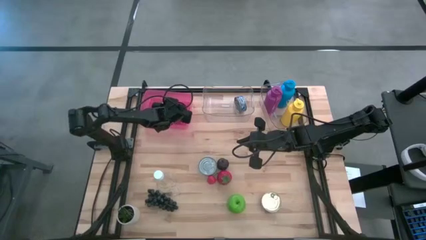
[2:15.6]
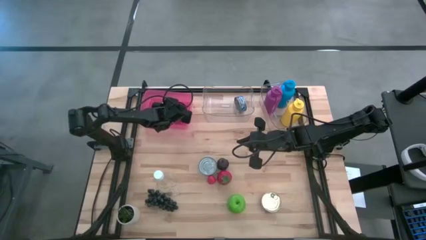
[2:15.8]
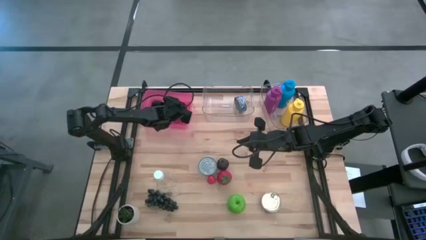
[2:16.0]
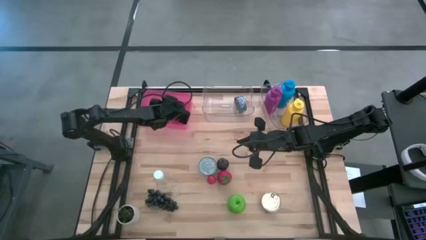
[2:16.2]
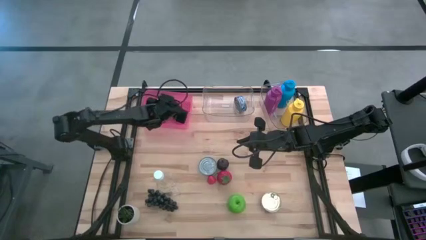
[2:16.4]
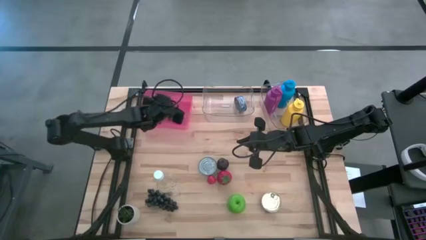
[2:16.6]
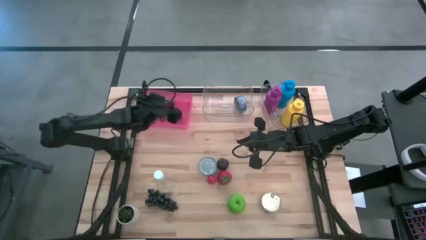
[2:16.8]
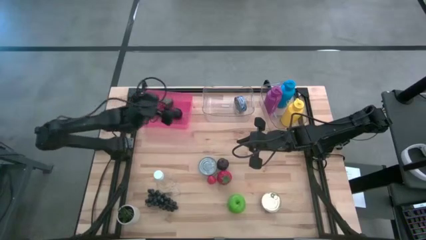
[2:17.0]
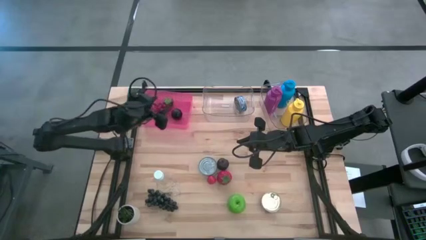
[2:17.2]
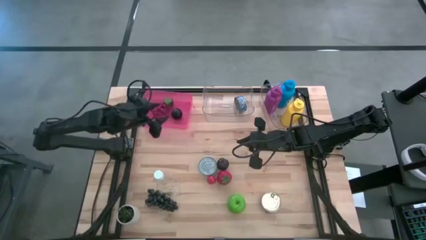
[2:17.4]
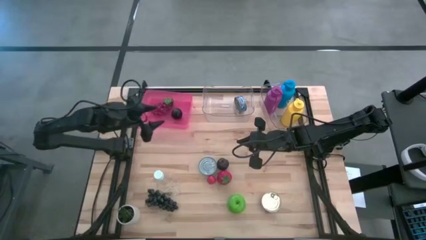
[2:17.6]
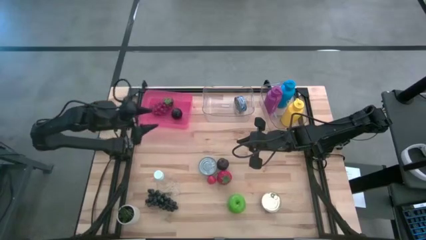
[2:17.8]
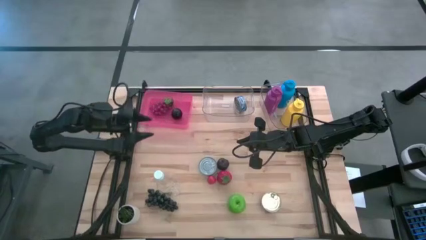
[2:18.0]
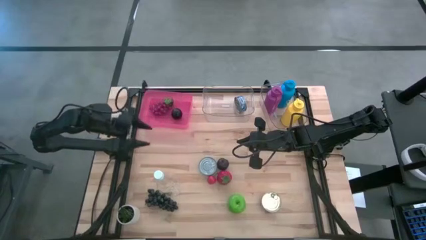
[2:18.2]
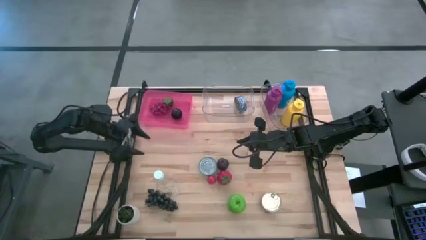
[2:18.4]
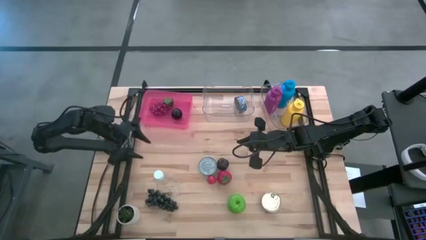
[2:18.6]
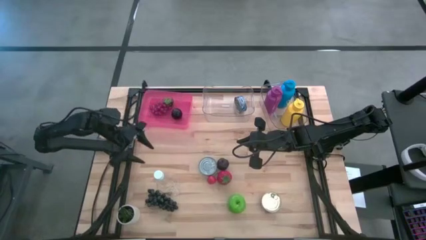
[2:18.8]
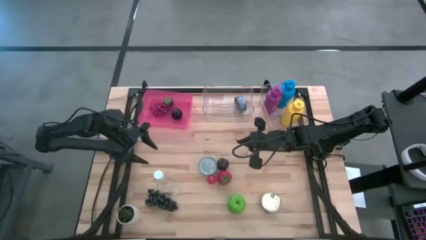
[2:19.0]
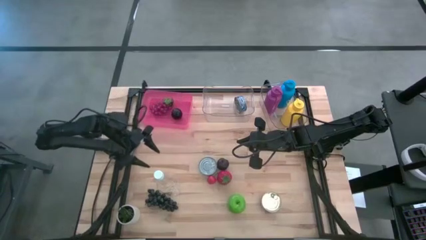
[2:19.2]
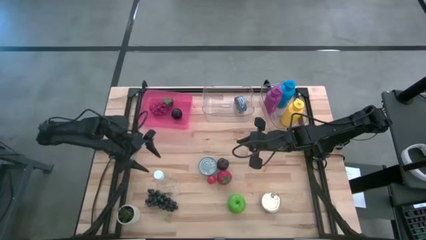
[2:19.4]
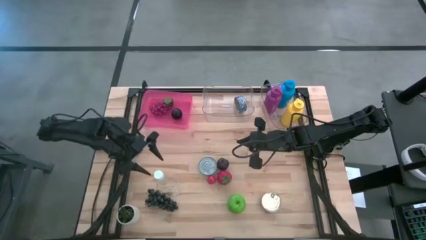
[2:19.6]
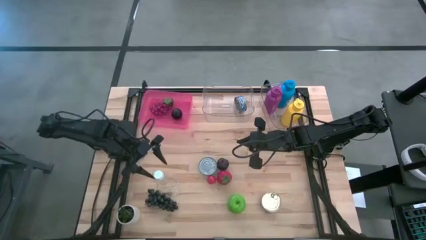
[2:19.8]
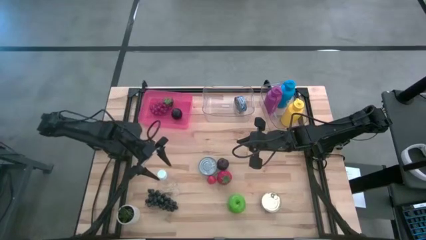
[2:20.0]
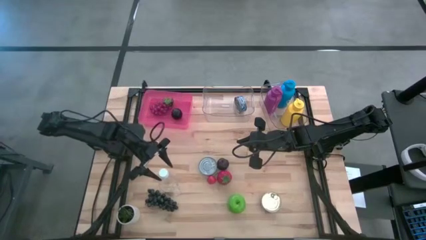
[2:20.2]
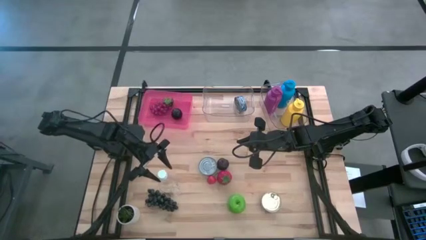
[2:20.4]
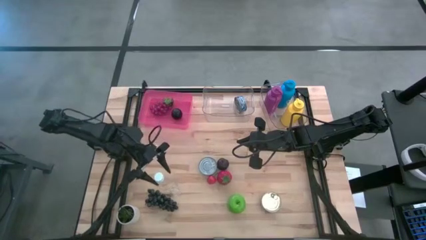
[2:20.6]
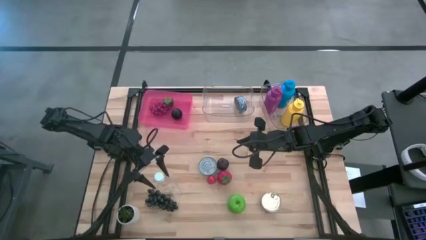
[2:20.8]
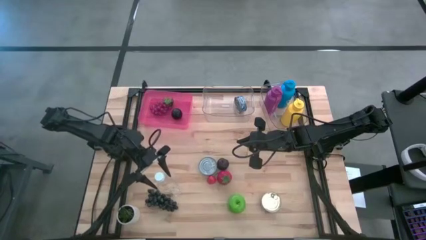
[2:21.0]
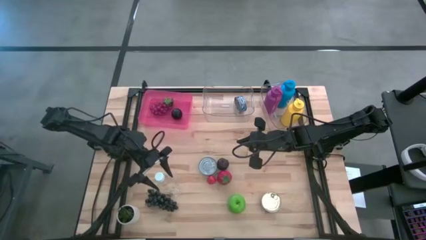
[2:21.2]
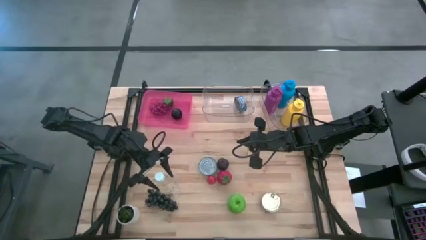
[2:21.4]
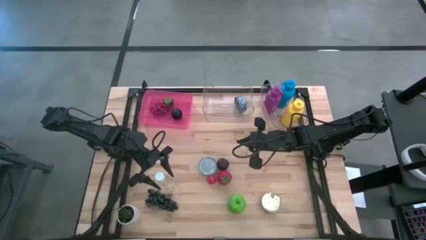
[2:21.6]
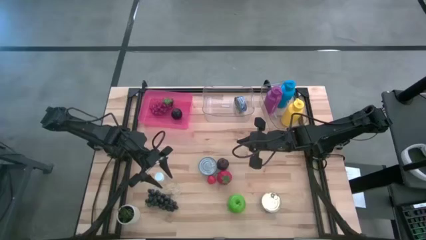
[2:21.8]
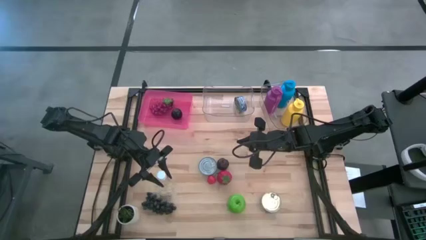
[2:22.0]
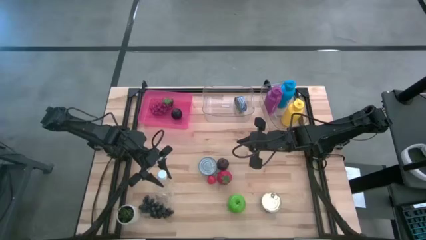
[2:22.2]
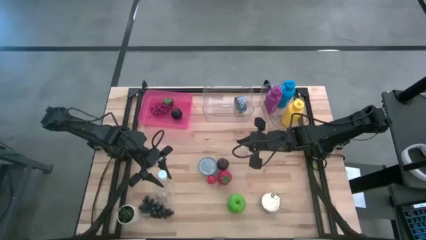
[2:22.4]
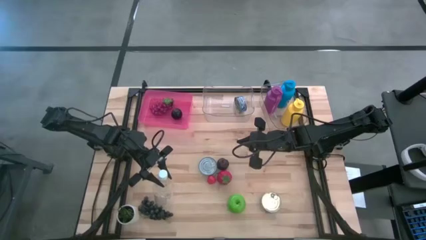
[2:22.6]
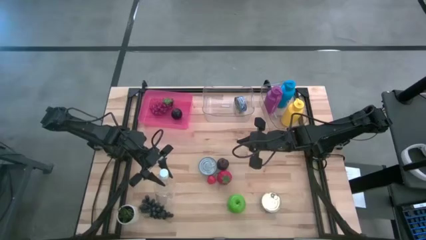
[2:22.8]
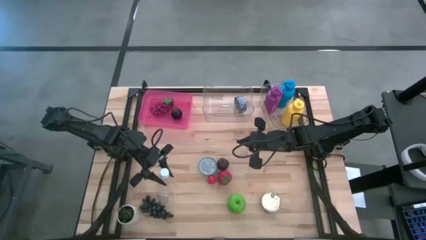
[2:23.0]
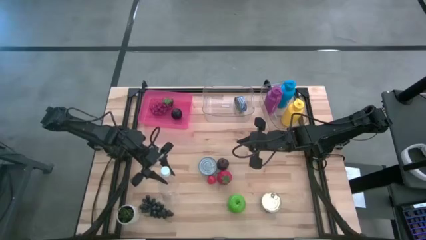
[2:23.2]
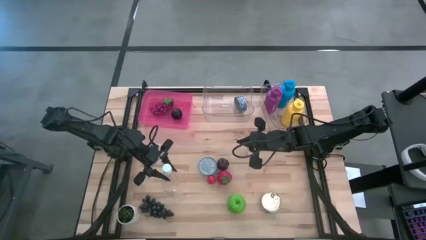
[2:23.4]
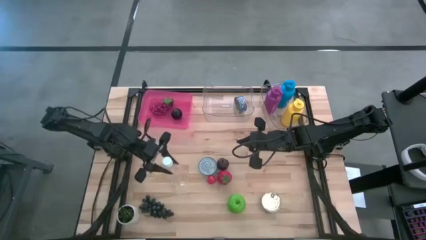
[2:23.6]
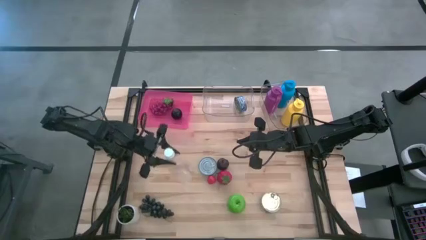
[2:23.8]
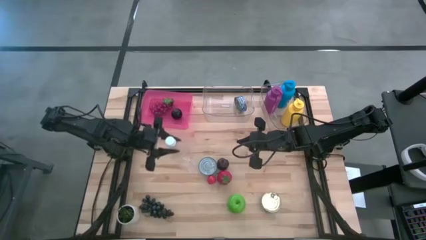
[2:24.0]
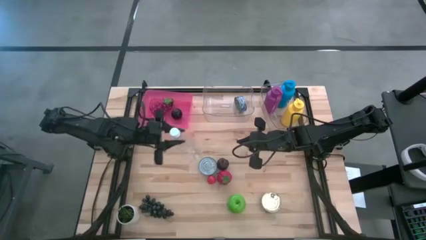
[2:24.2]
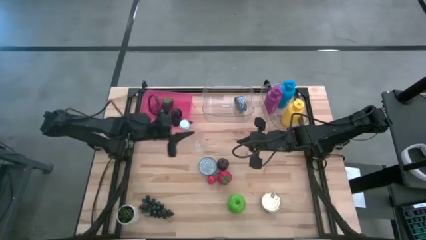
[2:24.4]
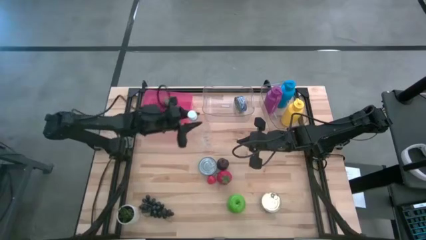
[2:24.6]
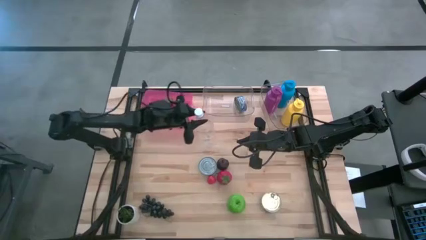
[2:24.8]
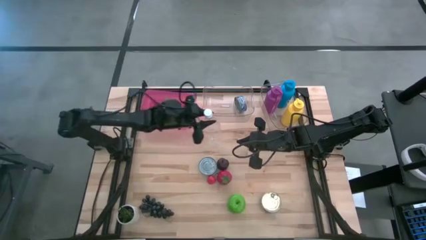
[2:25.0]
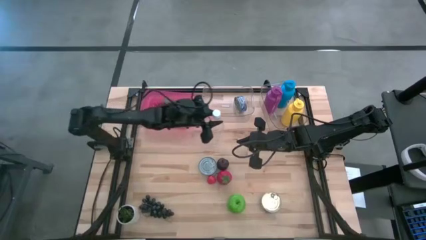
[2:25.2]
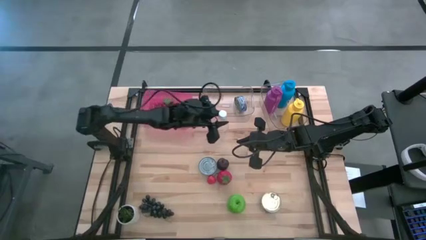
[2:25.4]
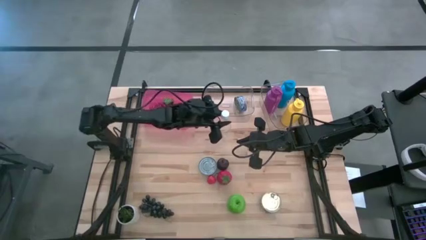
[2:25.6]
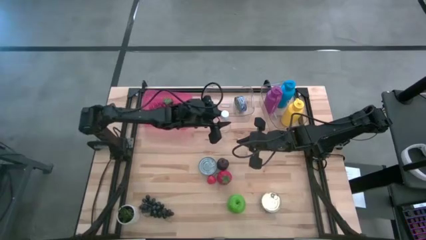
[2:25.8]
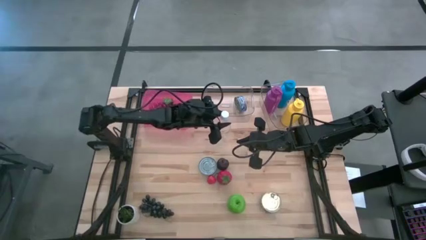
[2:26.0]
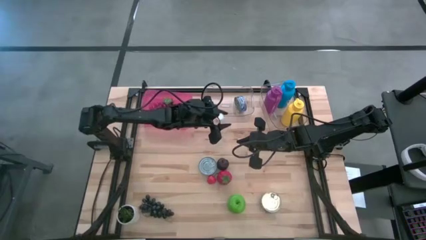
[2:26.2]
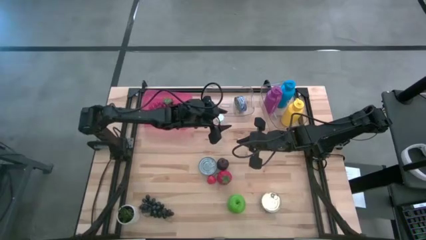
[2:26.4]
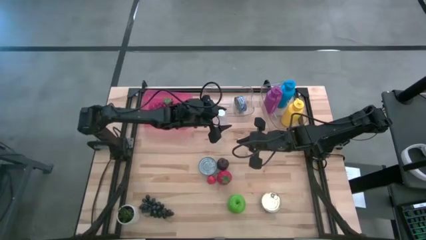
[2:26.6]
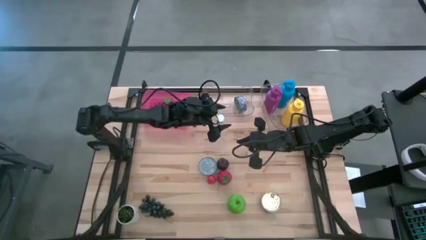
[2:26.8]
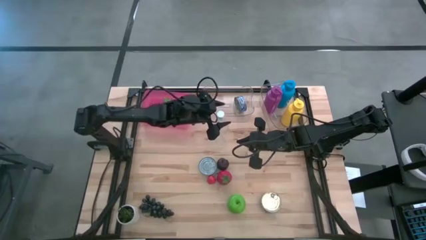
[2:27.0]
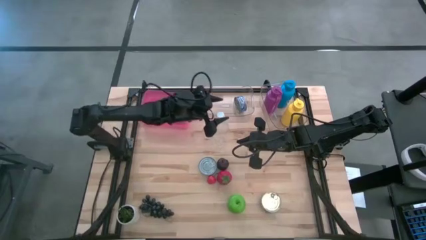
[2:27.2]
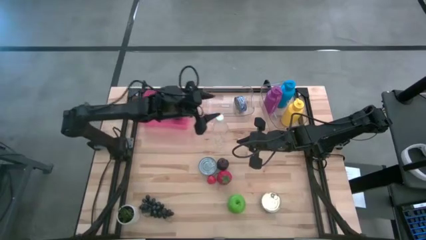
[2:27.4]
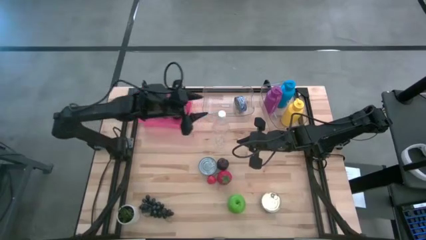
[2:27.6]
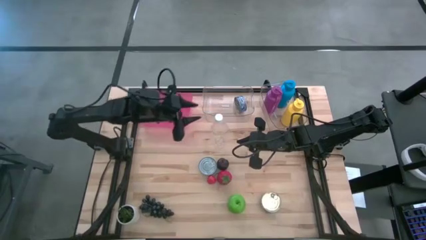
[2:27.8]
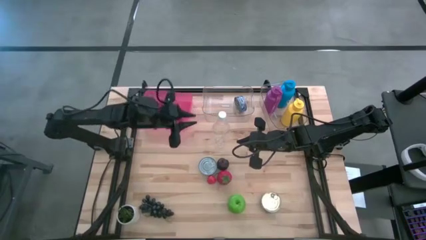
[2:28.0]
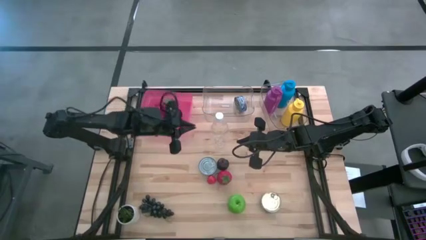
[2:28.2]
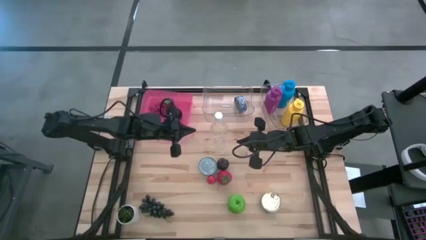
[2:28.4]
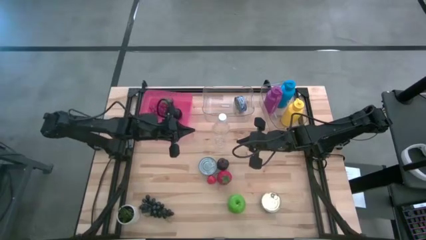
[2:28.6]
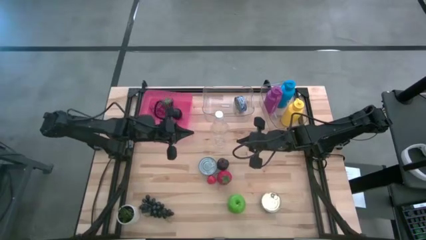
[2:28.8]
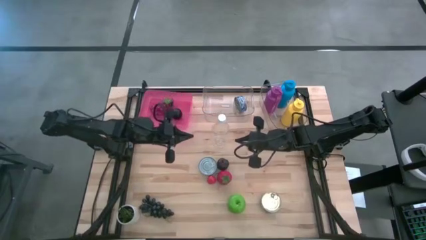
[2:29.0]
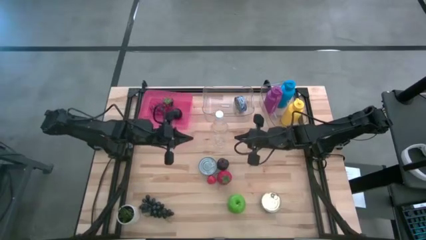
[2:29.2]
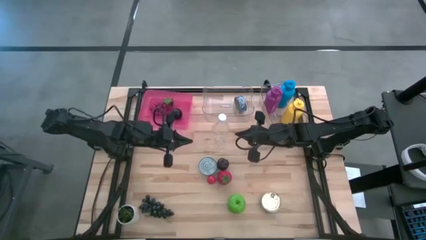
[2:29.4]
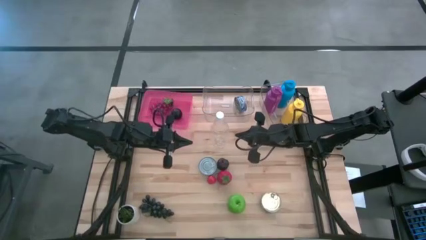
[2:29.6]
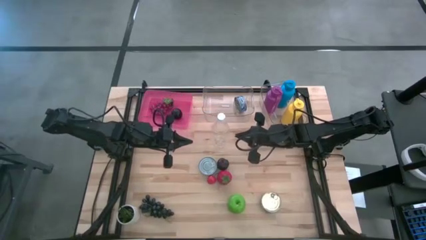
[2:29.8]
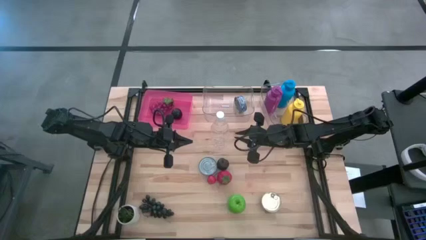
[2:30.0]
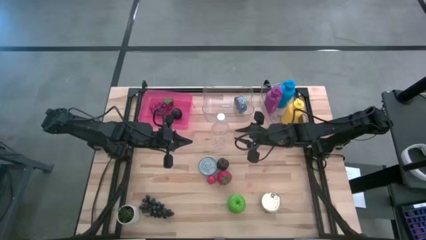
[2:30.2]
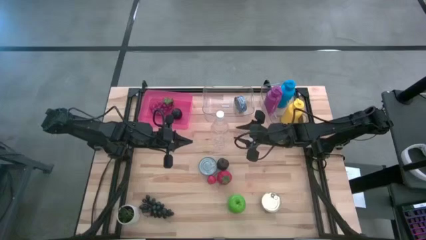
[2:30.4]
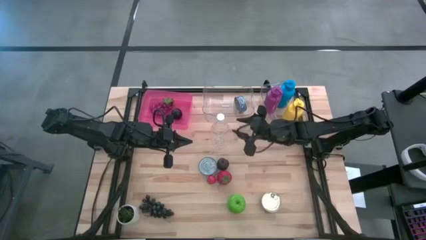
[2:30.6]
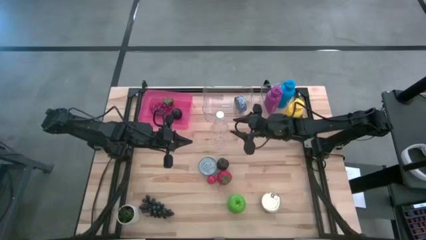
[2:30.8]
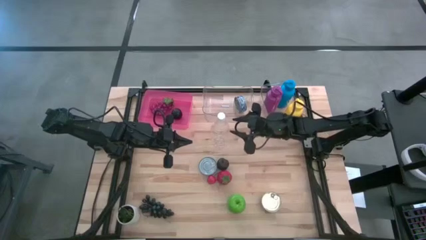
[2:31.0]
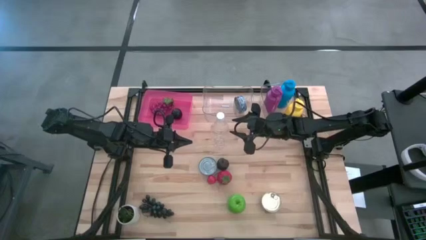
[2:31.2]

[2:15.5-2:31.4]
Task: Pick & Place Food Item
Put the transparent water bottle into the right transparent bin

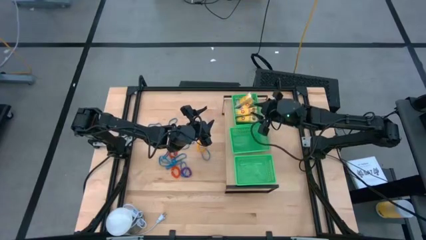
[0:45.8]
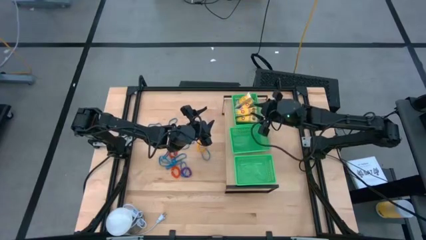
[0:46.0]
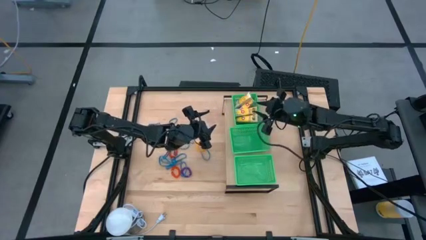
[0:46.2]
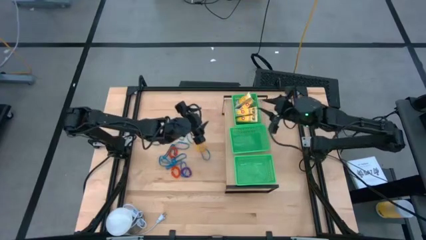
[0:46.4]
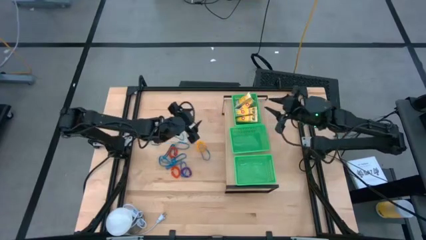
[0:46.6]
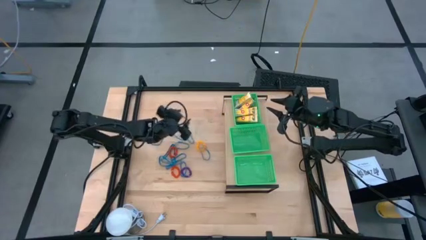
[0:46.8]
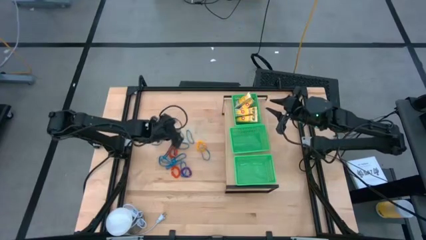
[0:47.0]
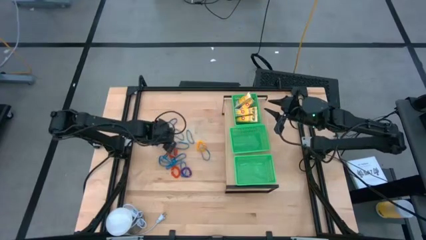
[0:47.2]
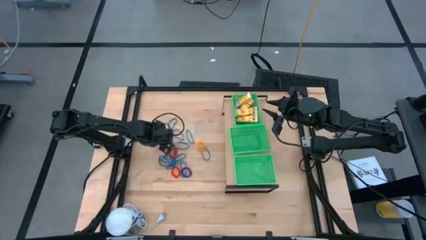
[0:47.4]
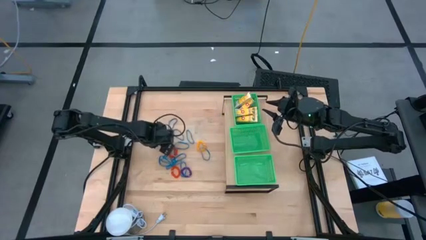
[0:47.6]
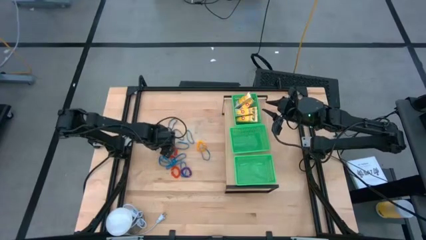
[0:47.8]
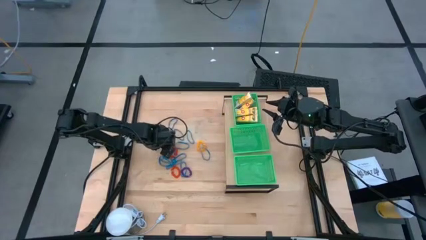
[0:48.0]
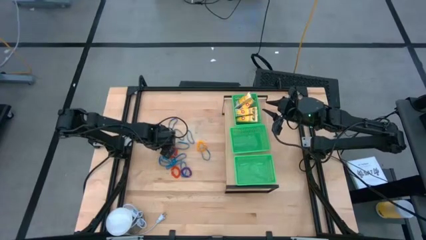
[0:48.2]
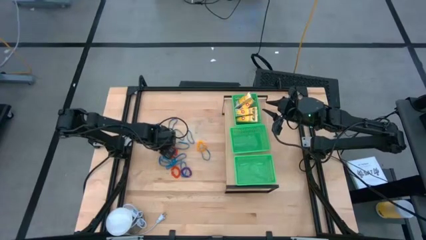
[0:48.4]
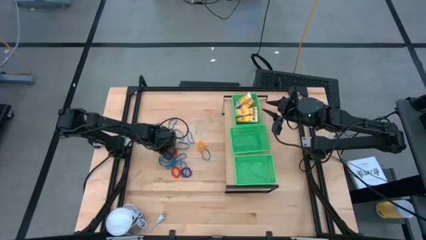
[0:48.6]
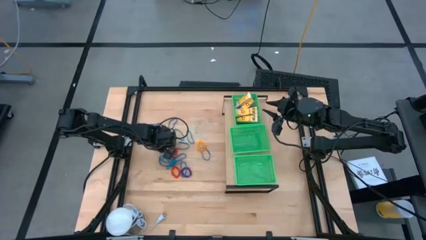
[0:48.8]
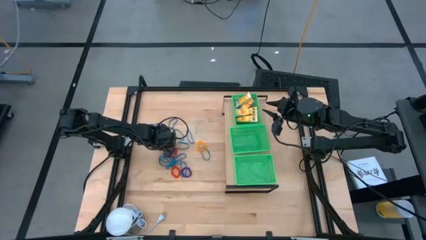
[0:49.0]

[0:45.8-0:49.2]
Task: Pick & Place Office Desk Supplies
Put the blue rubber band into the middle green bin
